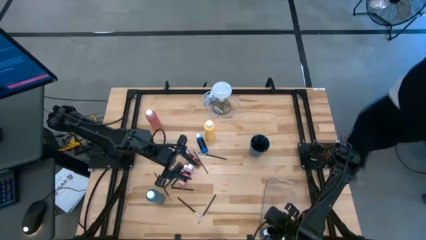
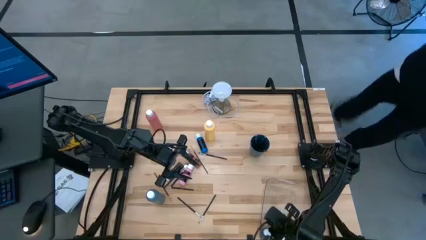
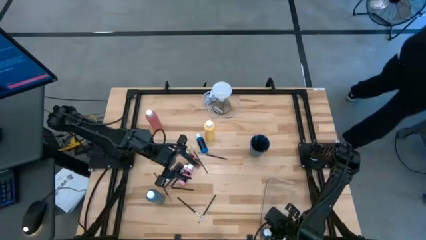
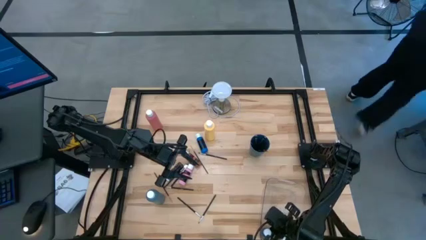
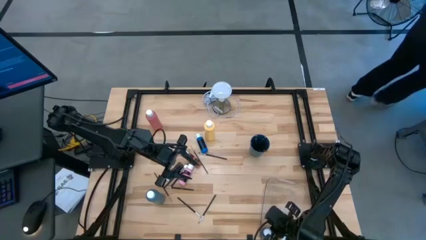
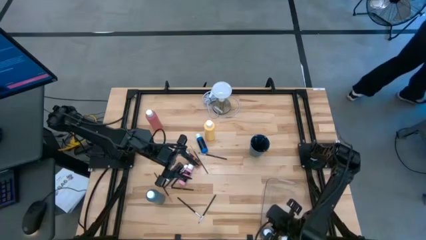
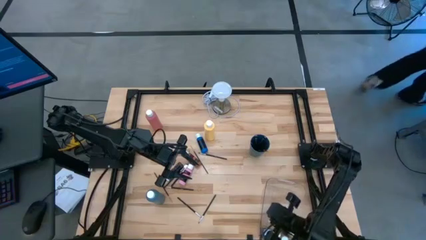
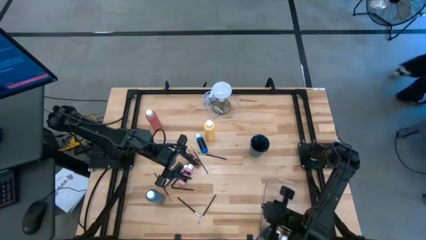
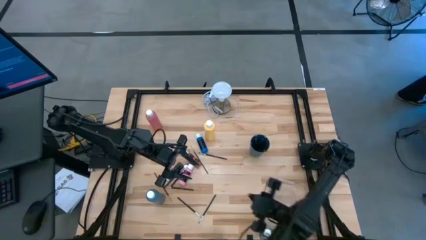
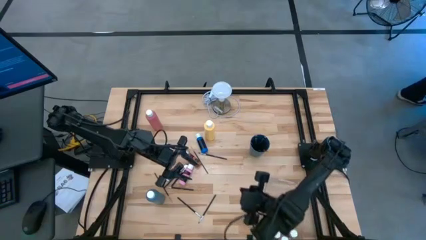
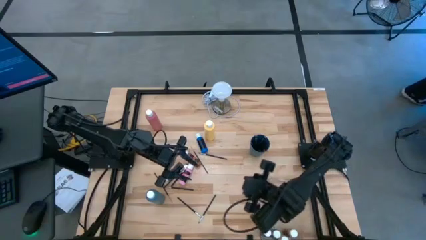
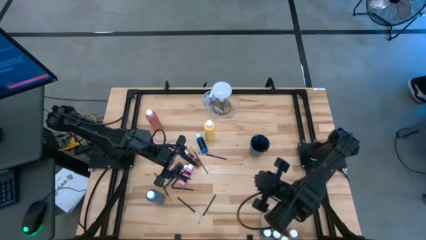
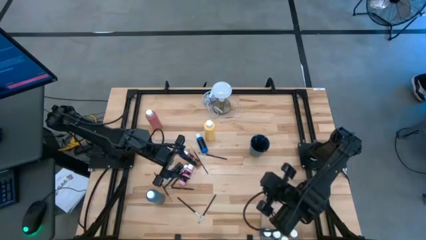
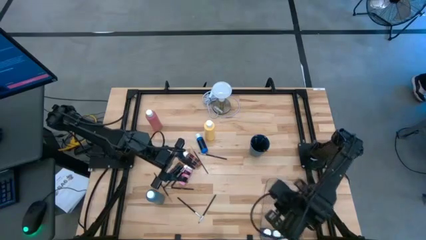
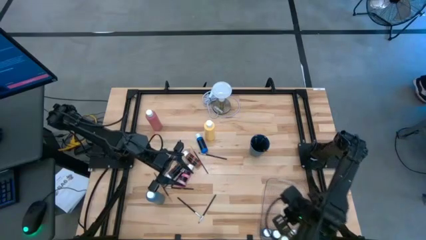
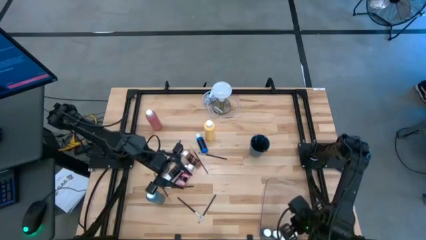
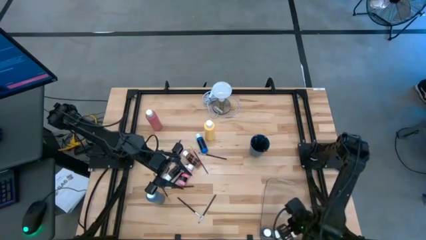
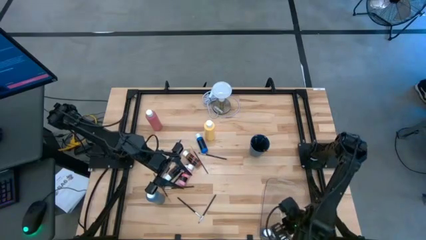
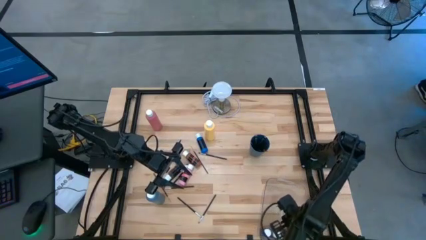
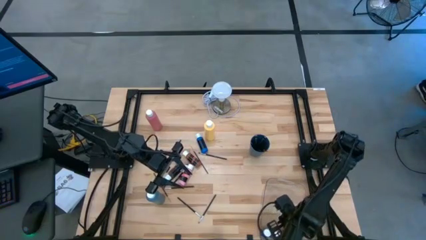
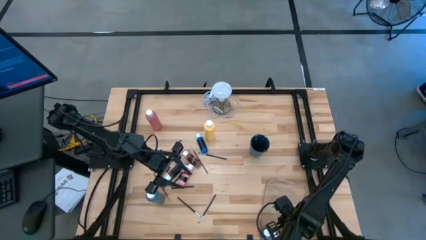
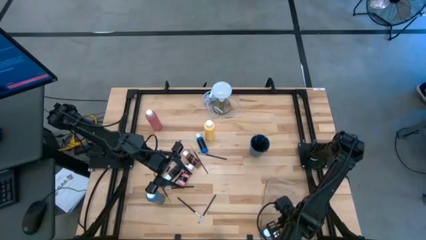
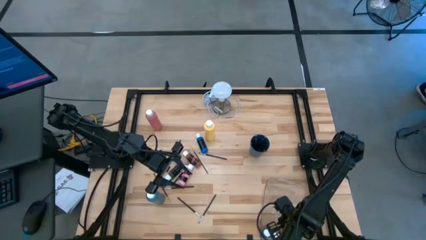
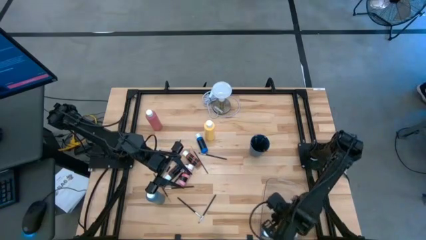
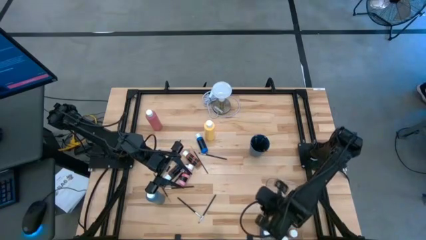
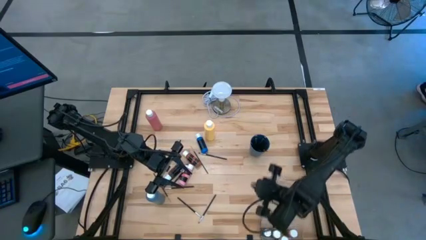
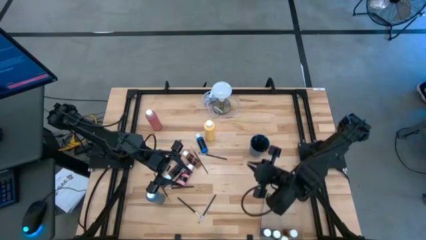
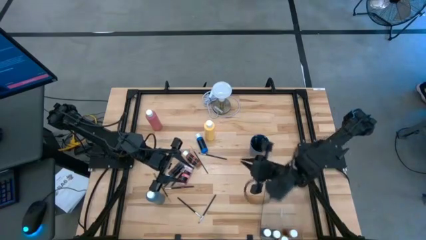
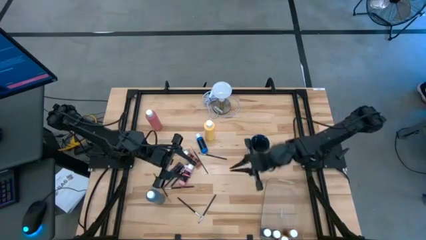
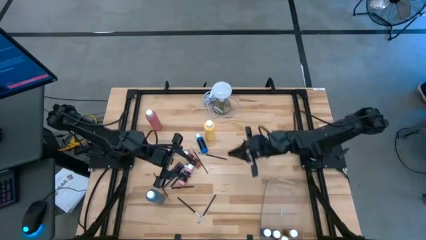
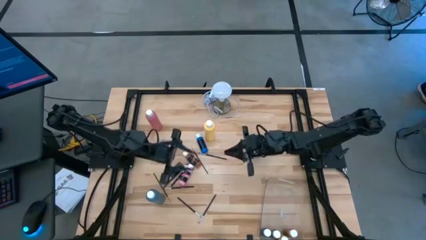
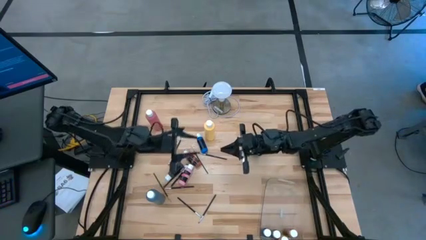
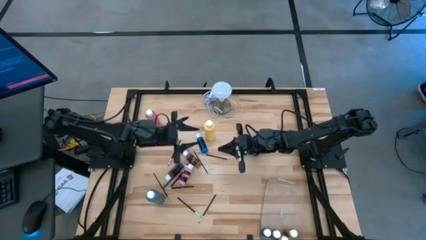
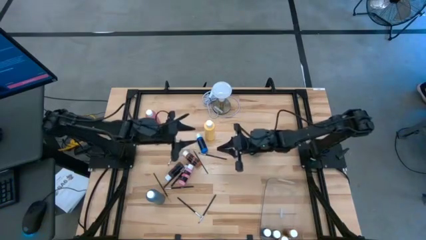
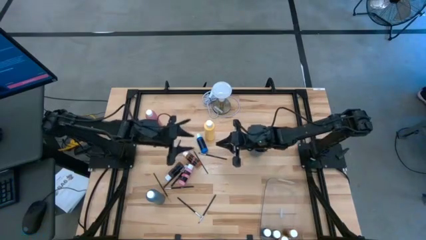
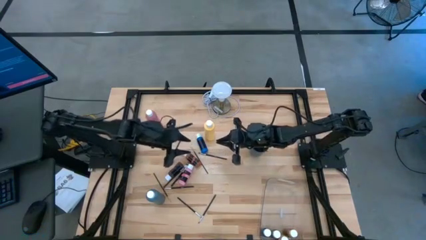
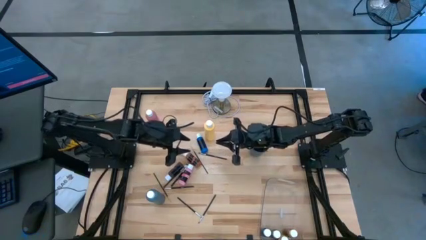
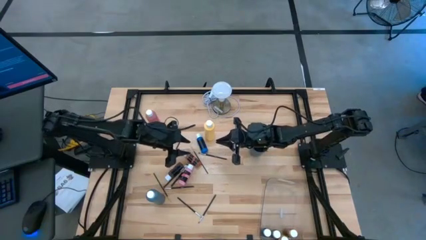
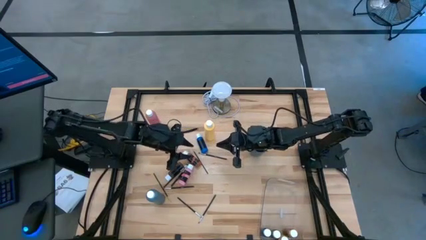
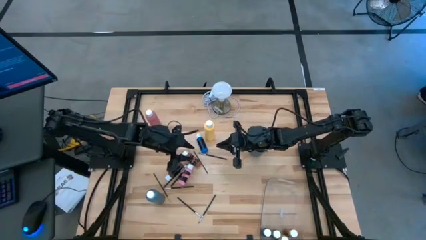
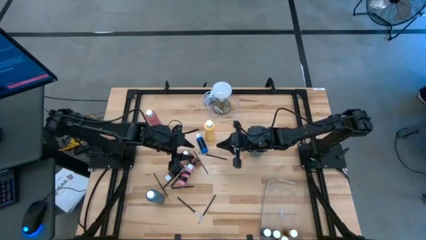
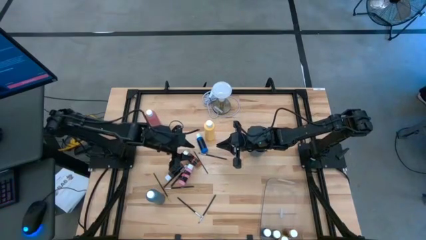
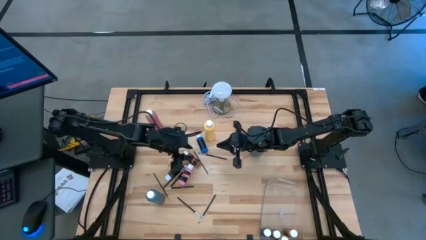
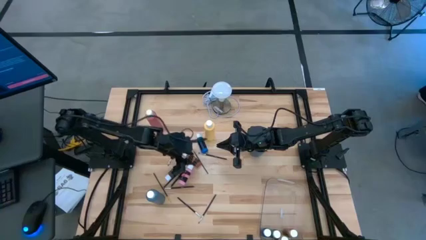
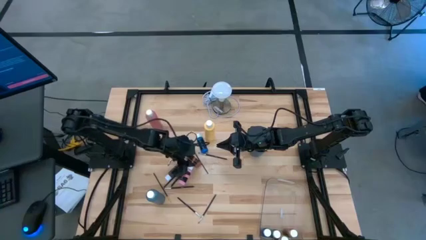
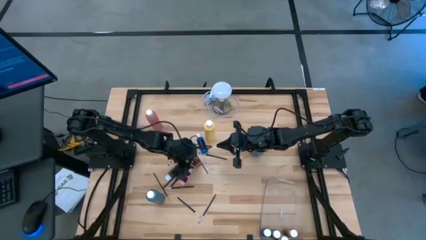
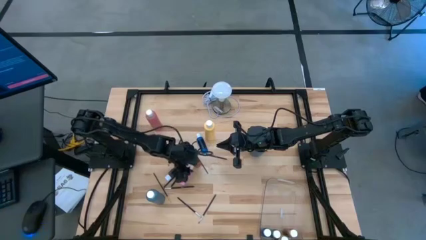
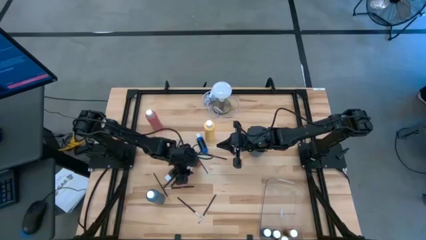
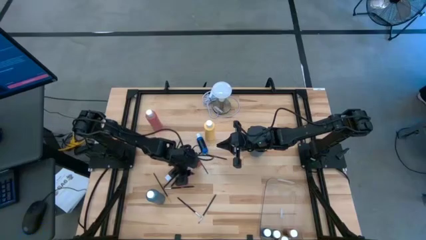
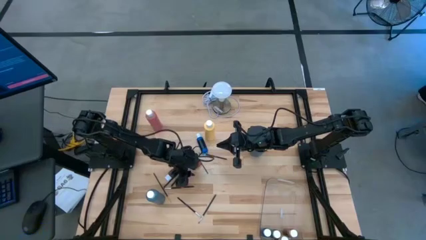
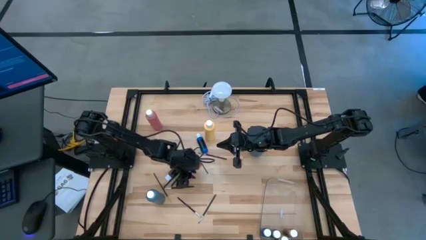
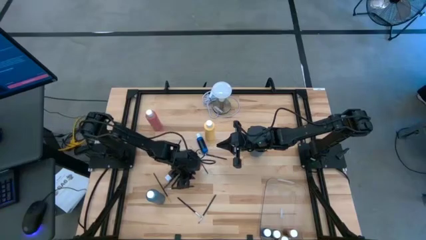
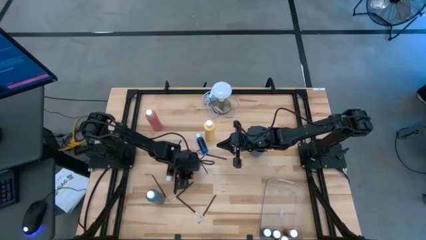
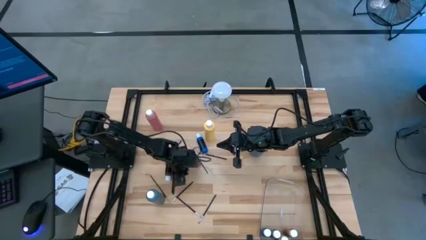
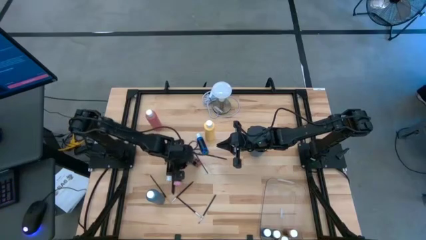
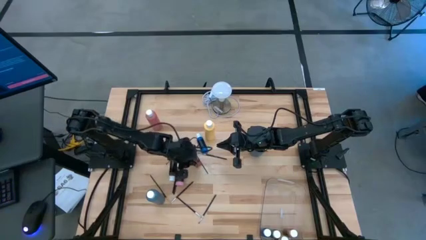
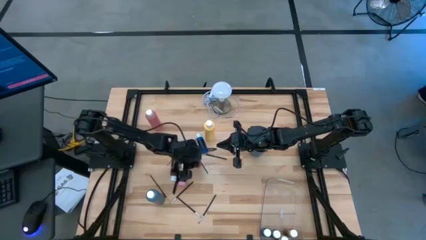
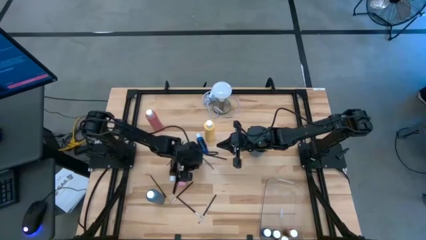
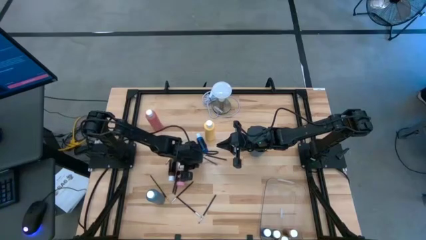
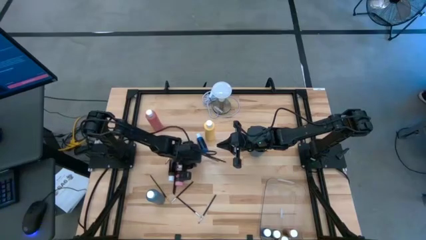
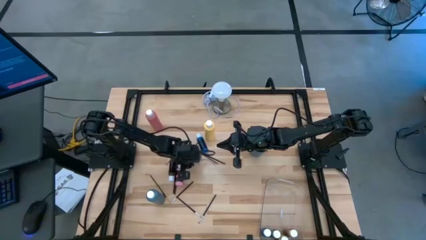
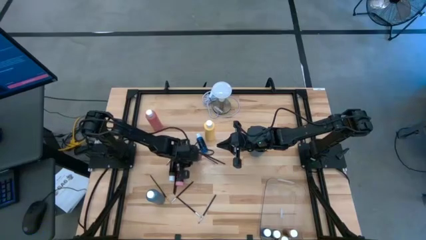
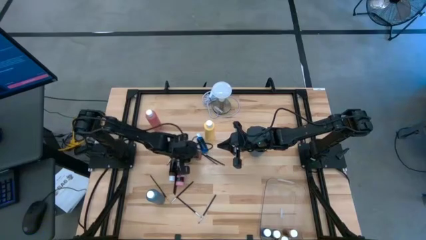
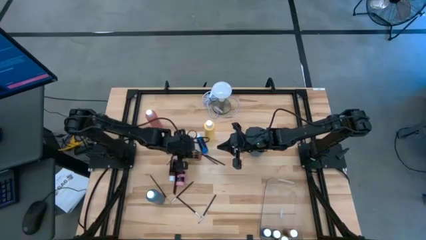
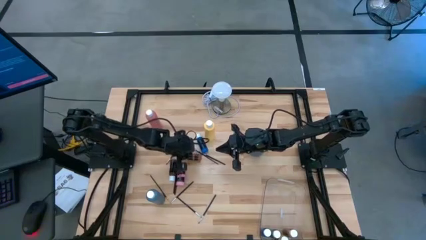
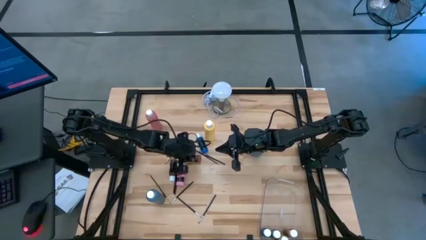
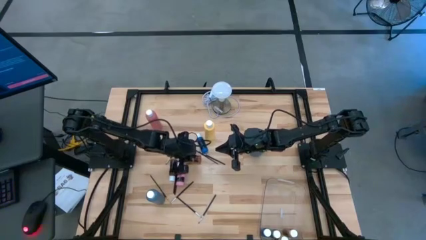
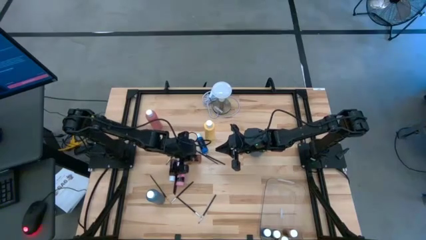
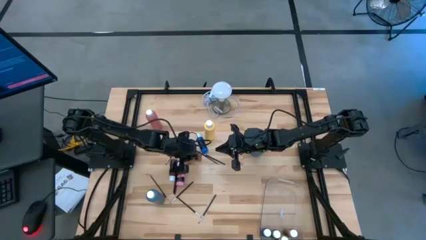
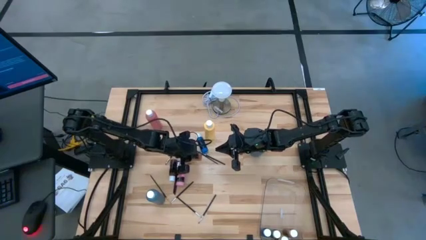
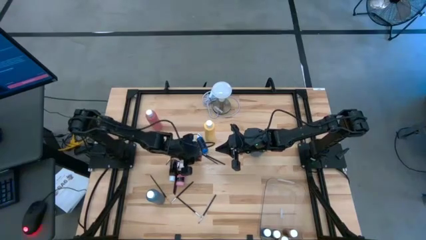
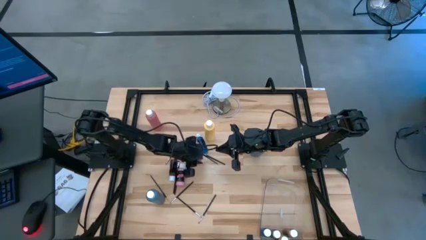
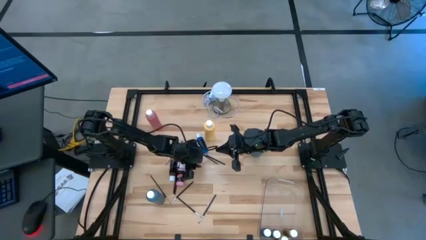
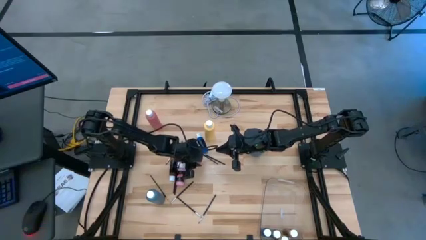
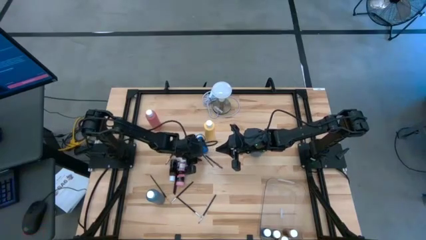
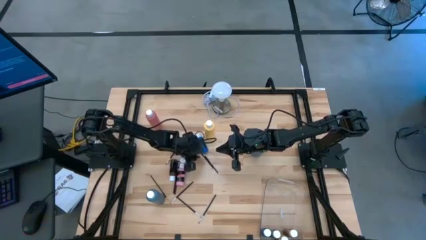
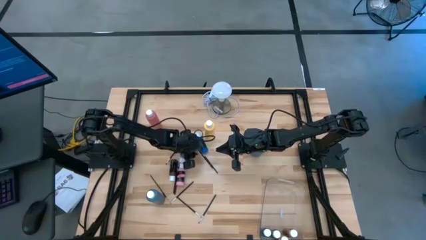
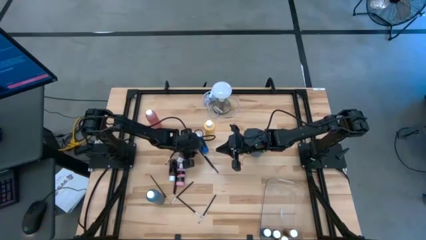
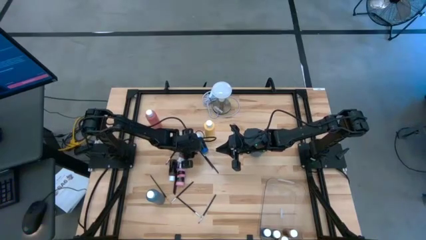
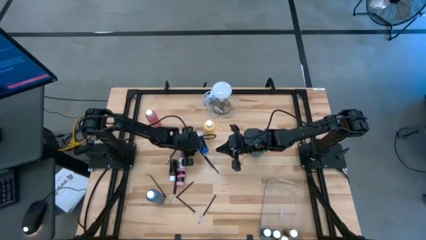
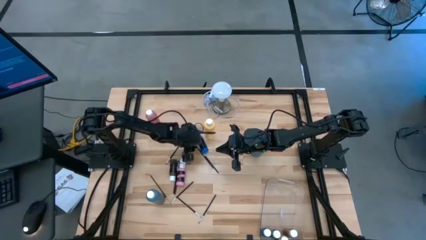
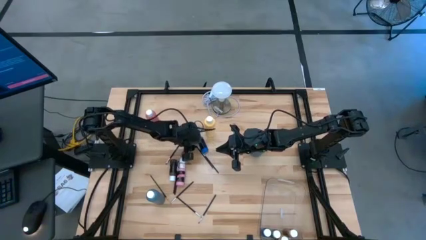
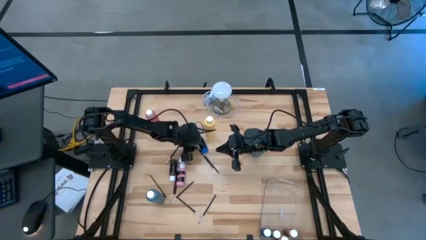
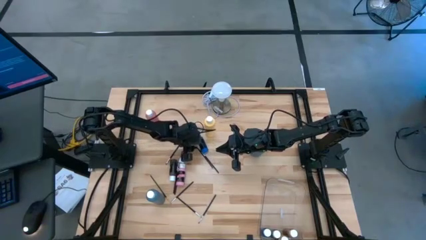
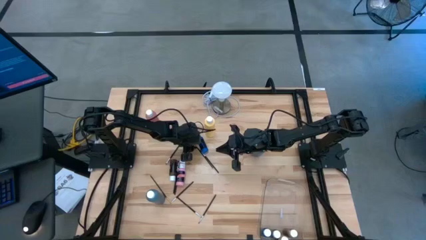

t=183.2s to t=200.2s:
Task: Pick & Place Paint Supplies
Put the top black gold paintbrush into the blue cup
